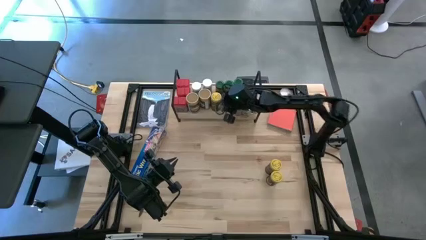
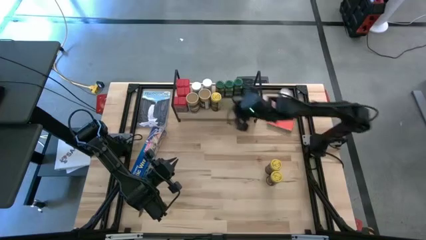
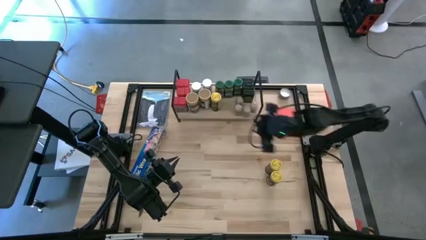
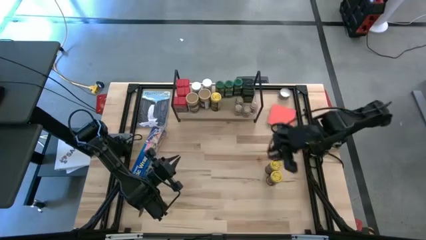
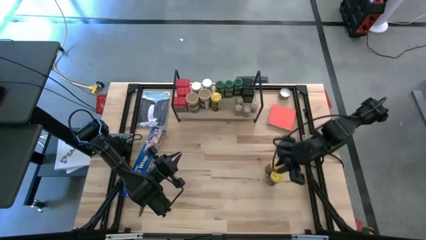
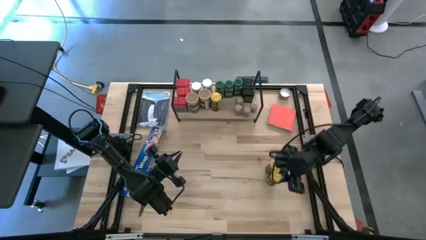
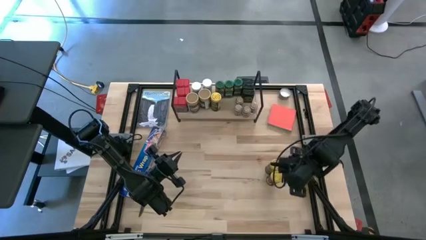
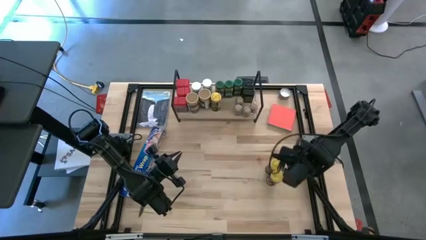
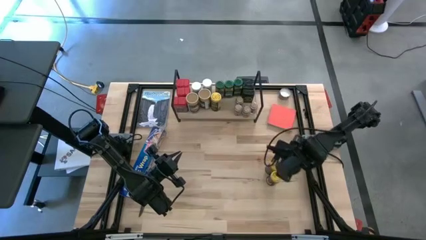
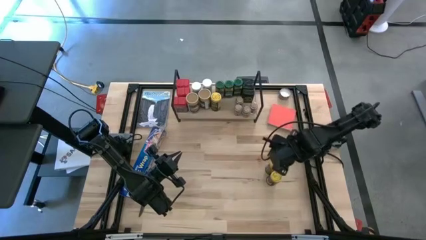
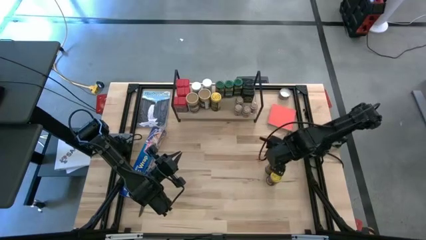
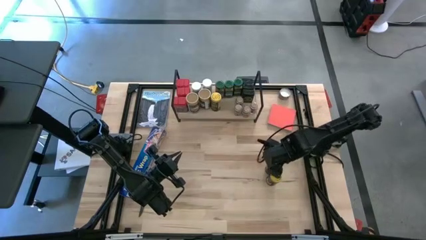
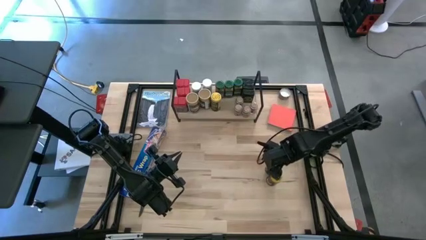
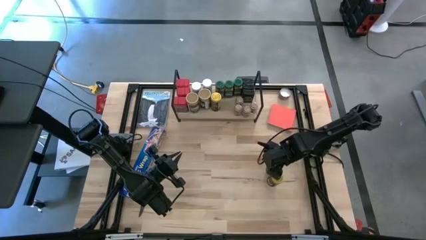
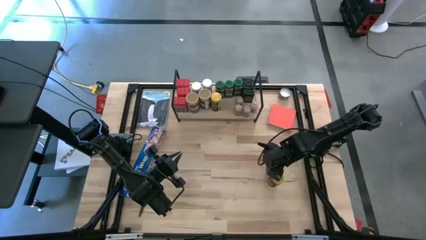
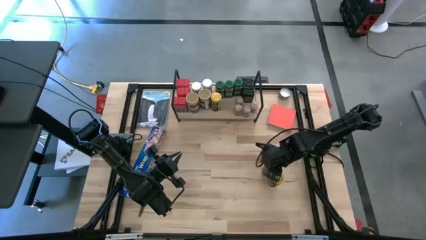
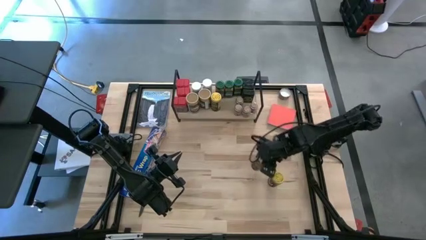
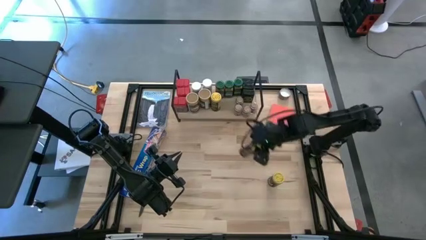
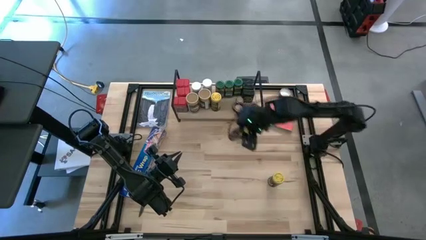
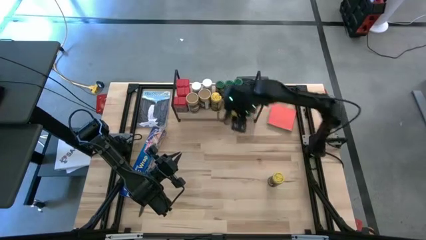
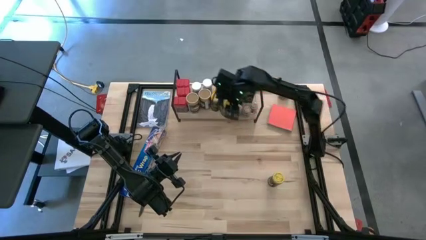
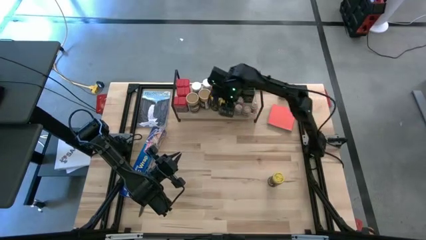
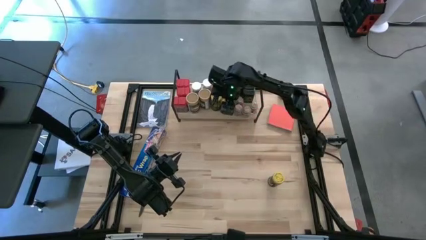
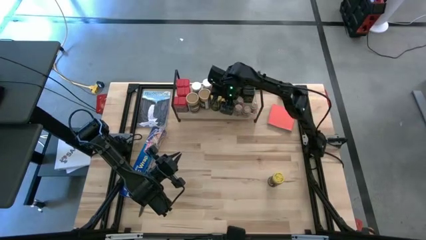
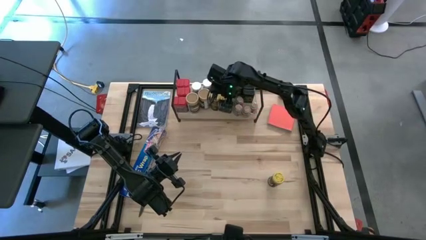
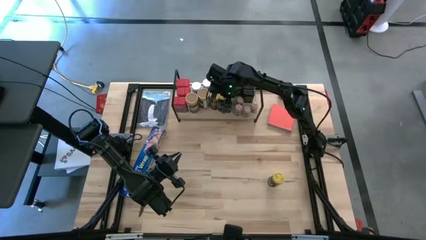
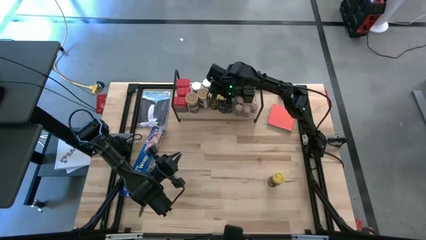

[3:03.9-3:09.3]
Task: Shelf spices
Put the yellow seasoning can on the shelf aligned with the green seasoning bottle

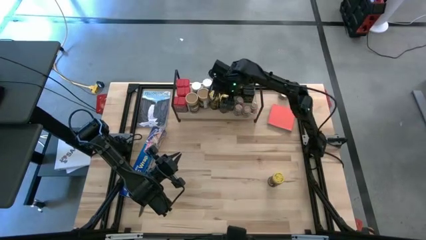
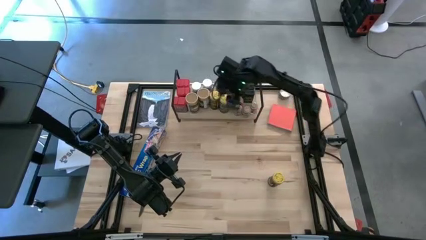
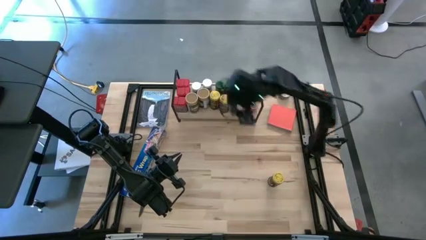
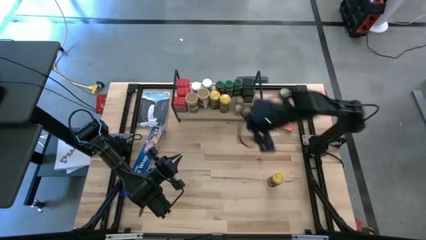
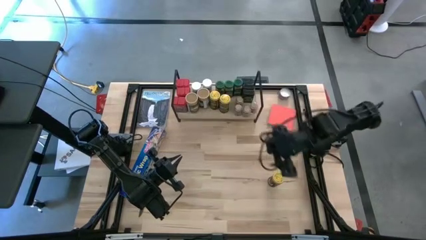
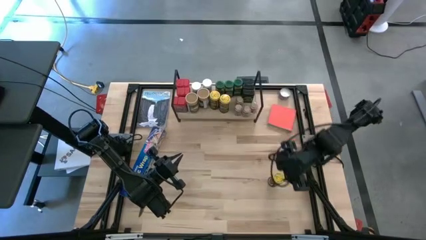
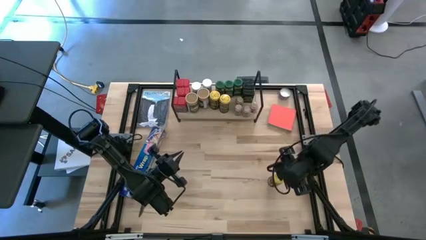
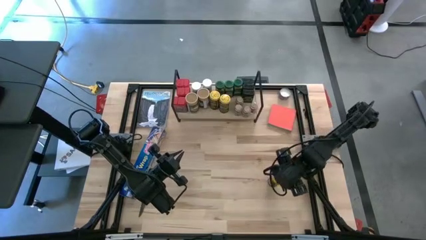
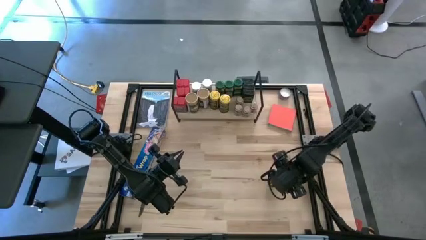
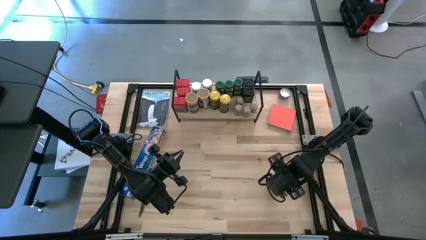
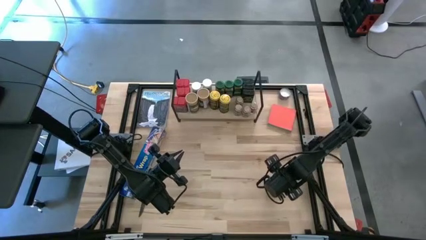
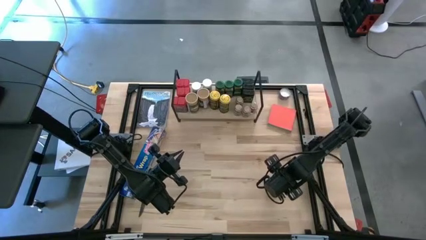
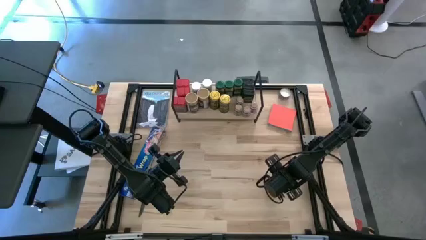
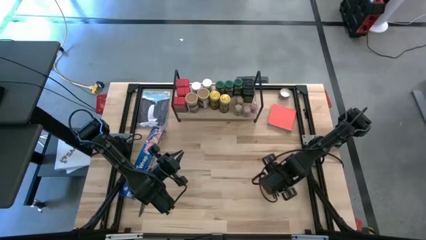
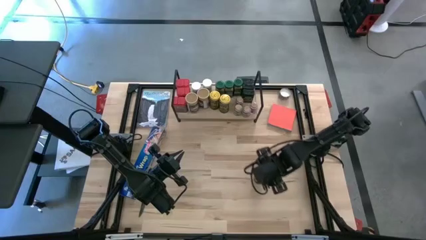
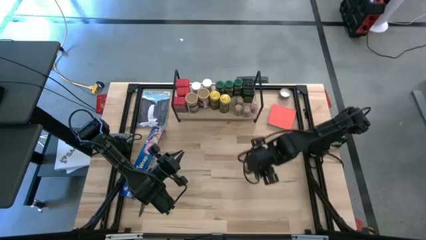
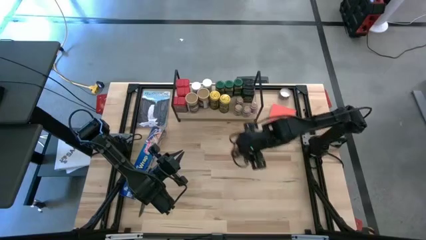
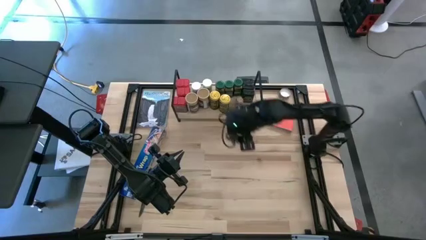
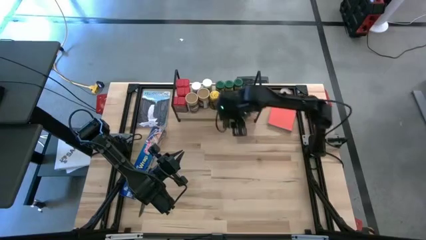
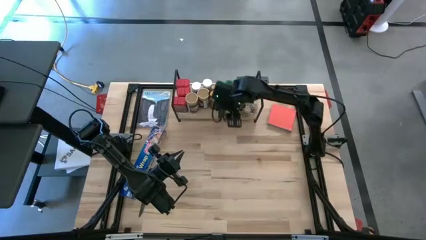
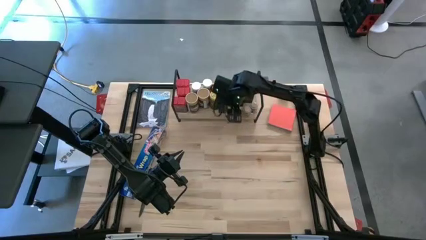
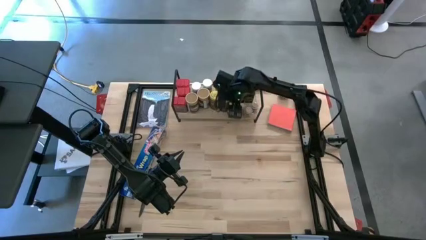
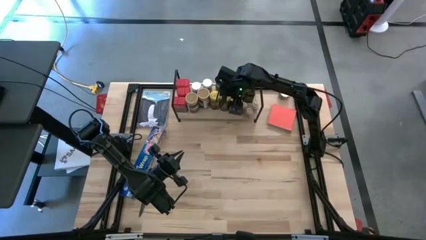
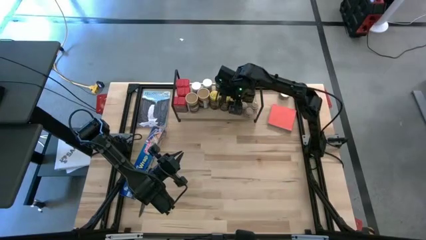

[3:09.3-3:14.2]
Put the yellow seasoning can on the shelf aligned with the green seasoning bottle

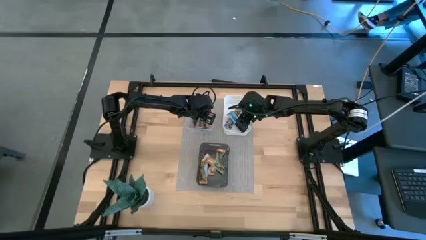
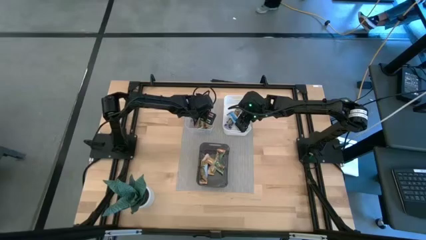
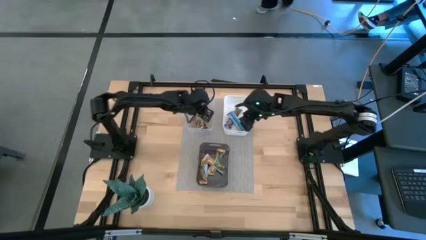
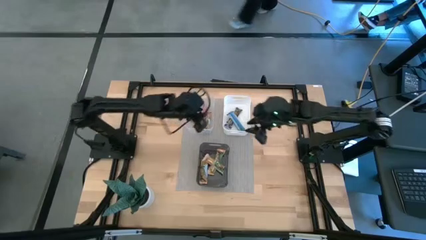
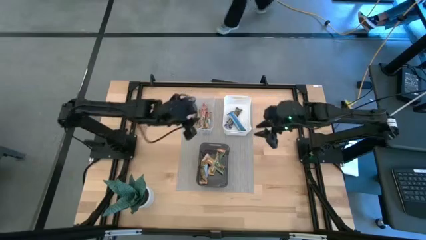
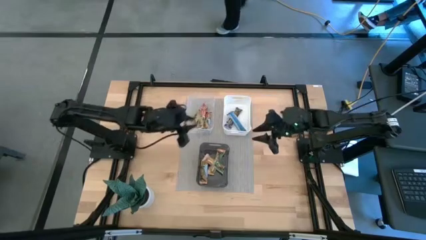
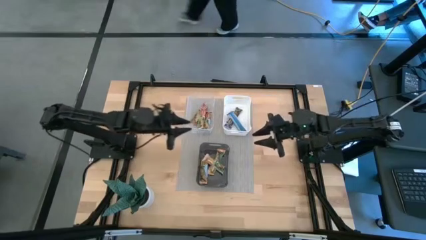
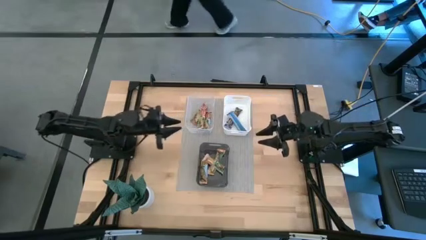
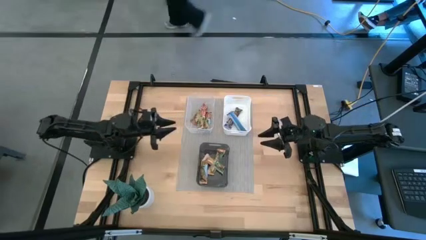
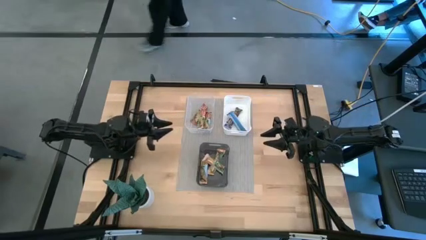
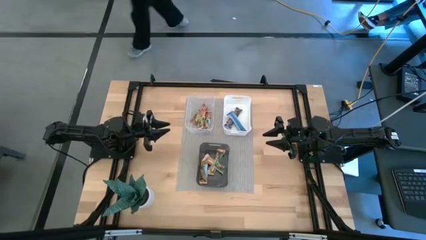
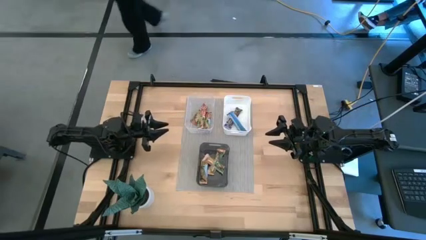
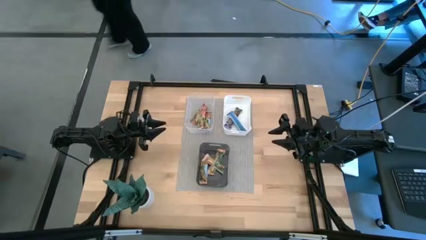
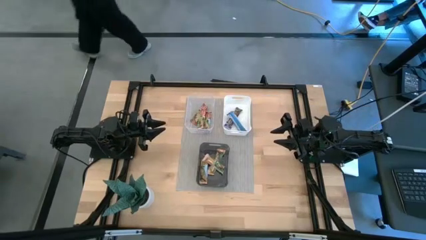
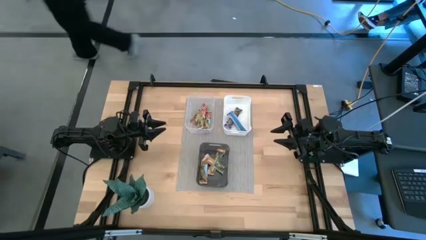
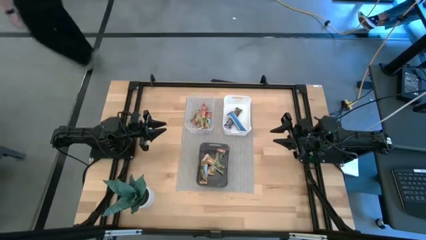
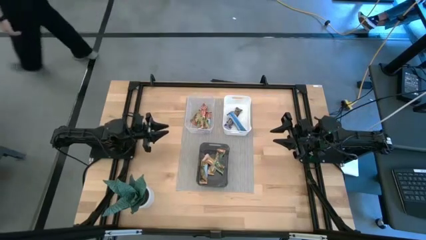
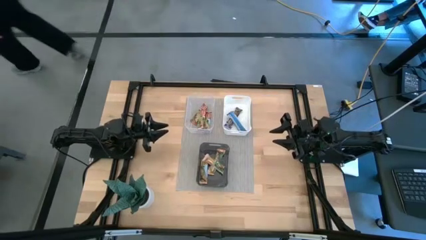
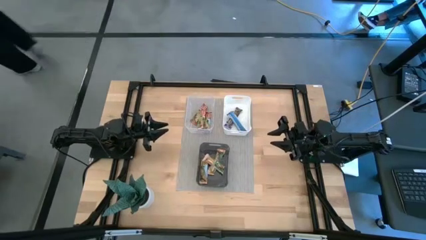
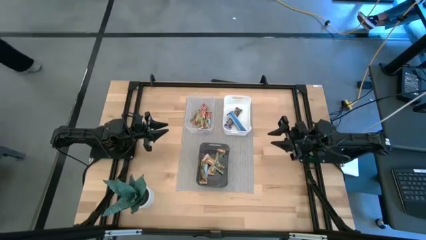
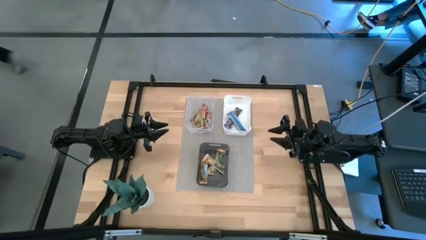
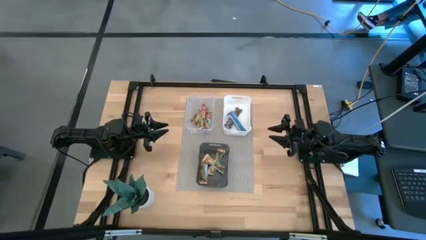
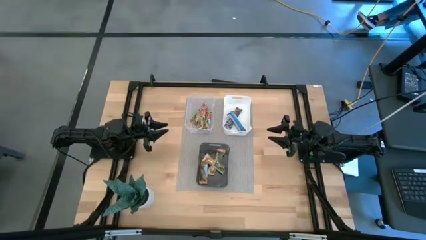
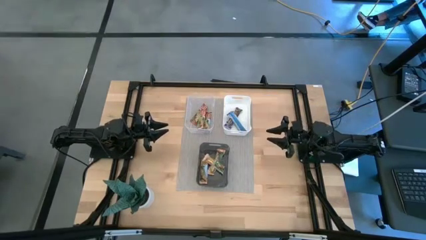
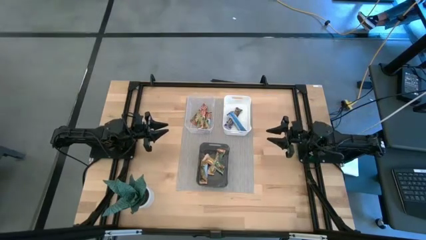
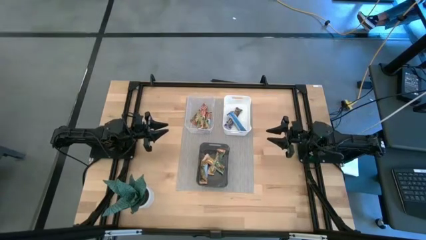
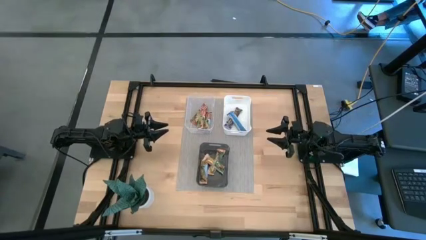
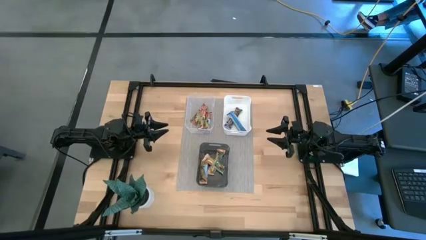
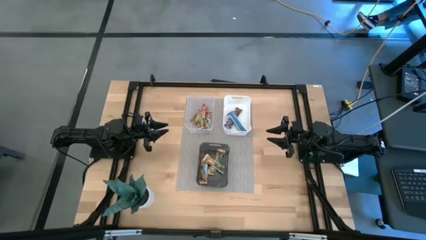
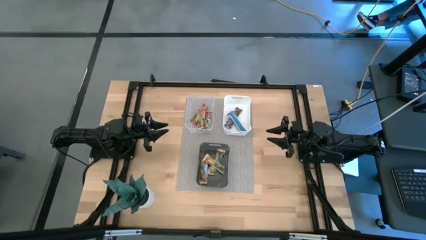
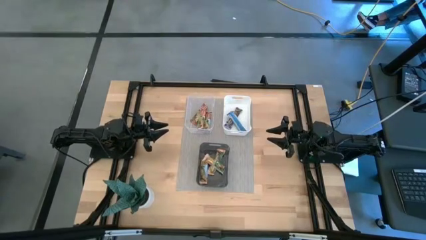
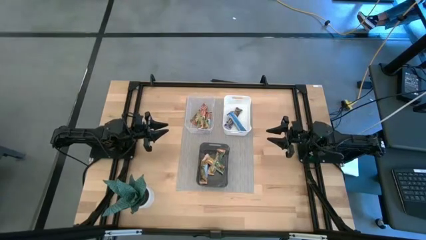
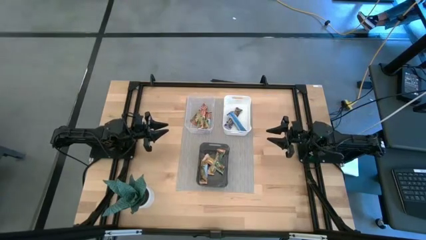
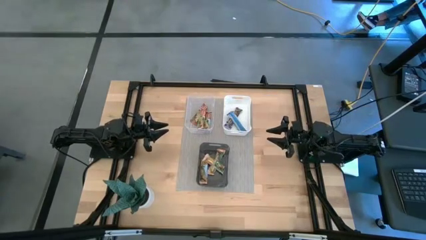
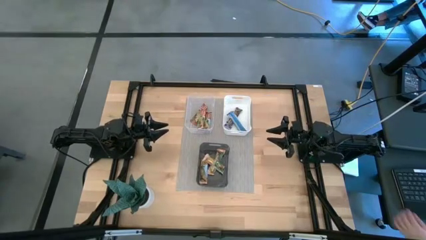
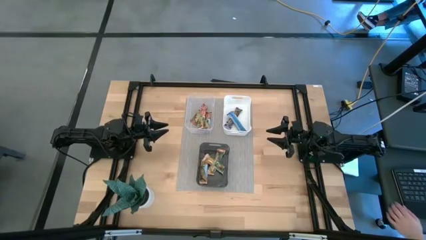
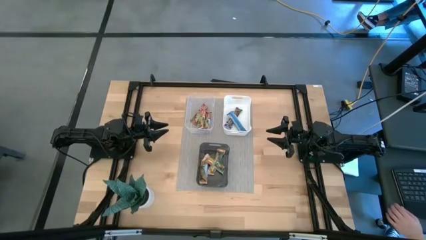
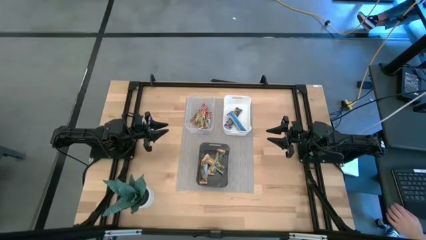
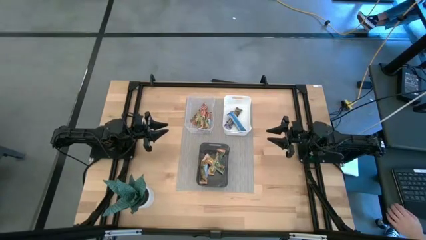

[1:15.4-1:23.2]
Task: Pick and place Granola Bars by type
Return to Home Position
